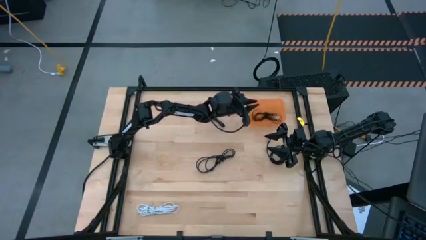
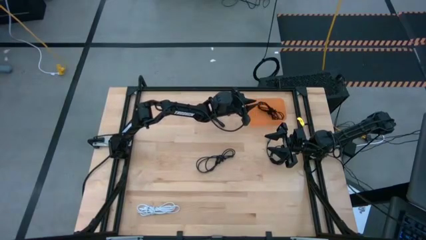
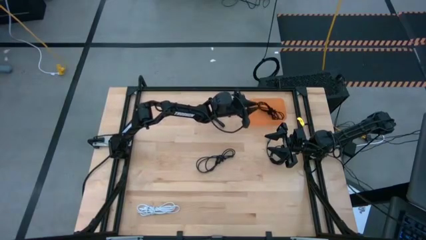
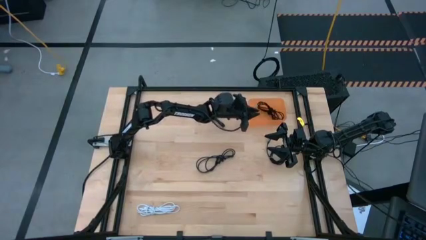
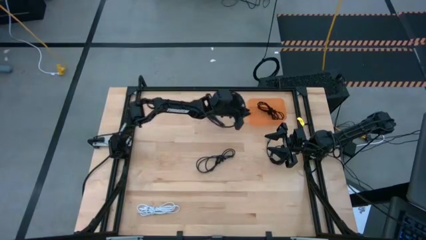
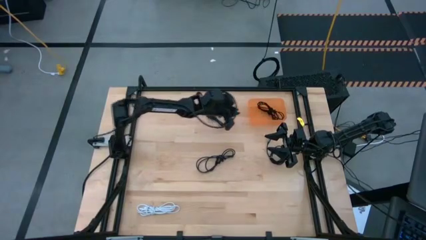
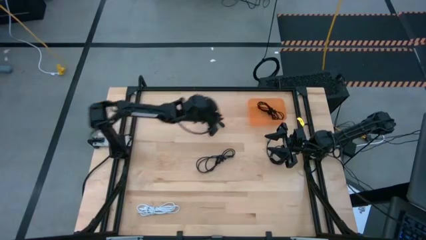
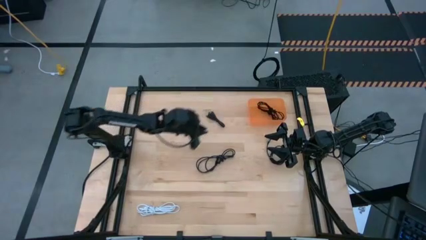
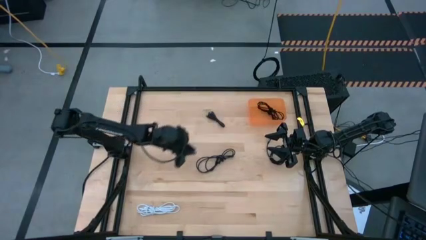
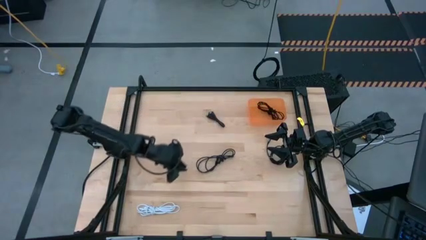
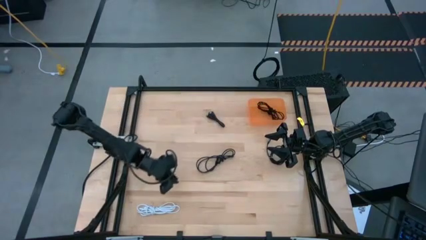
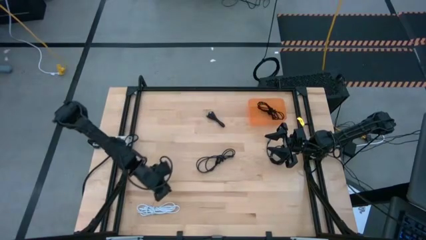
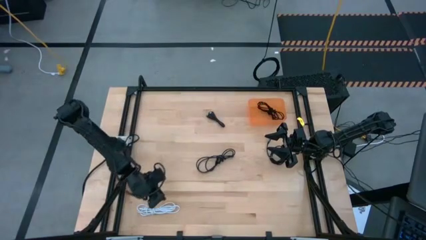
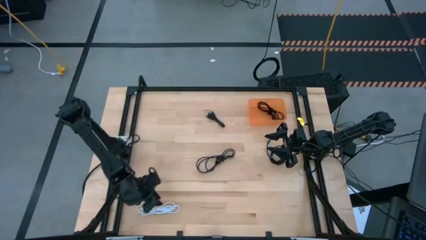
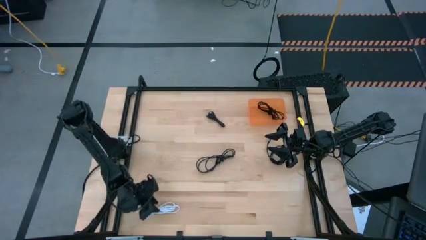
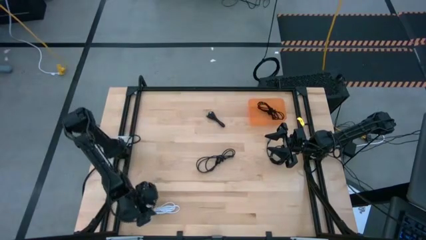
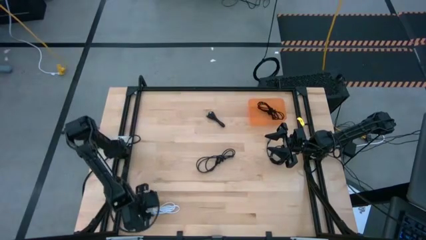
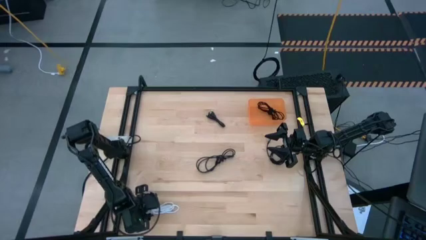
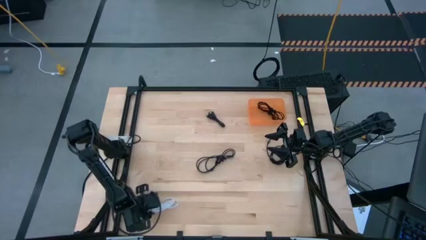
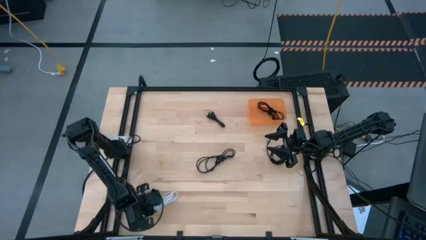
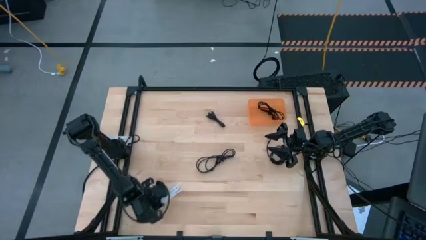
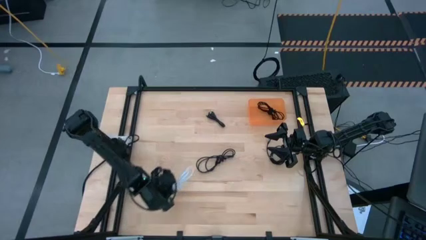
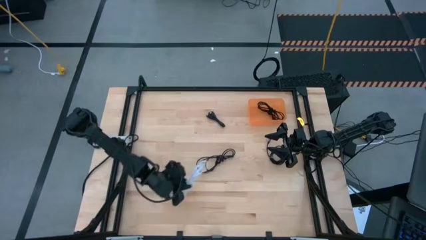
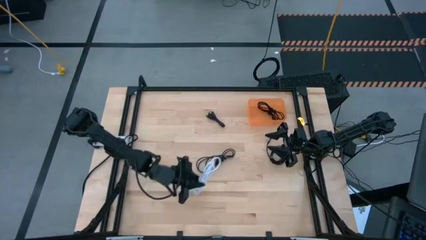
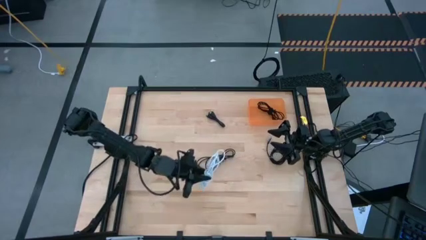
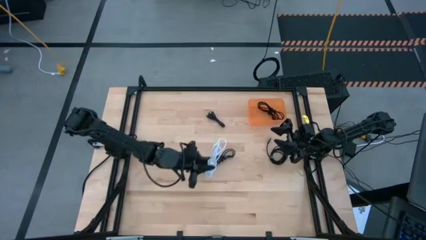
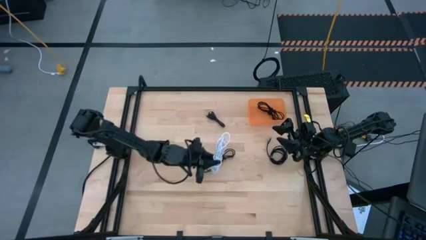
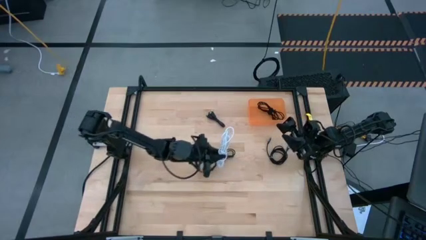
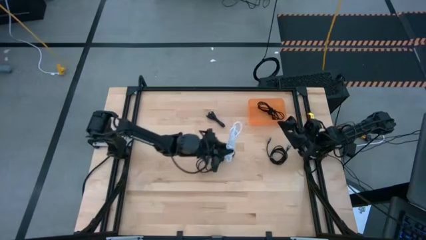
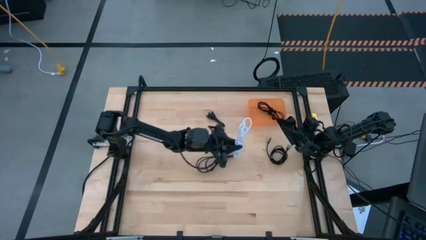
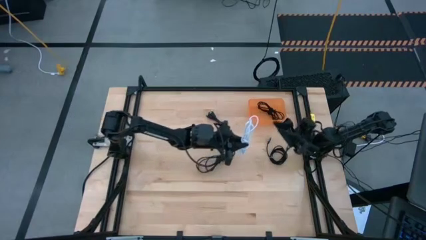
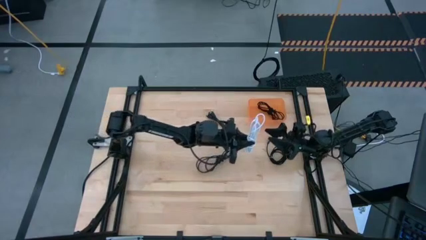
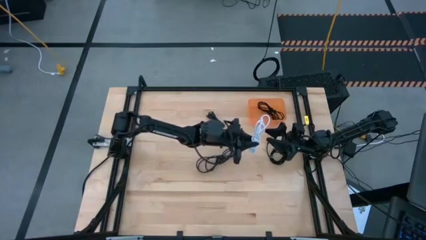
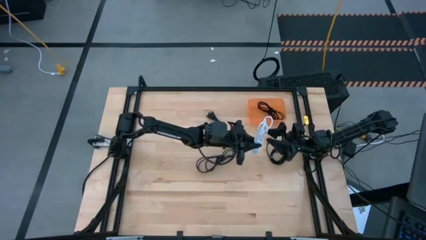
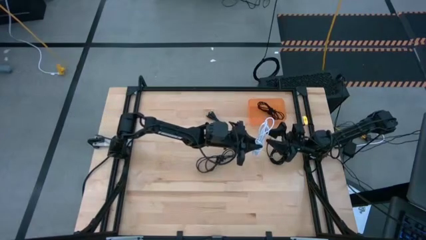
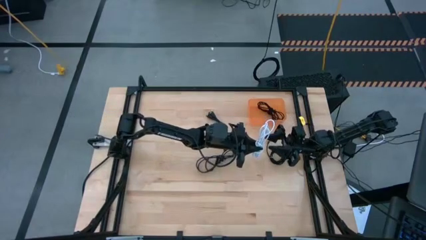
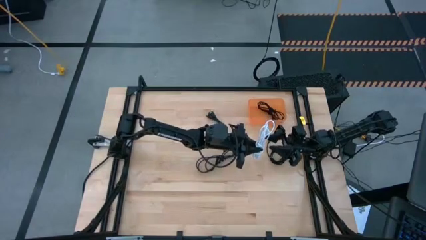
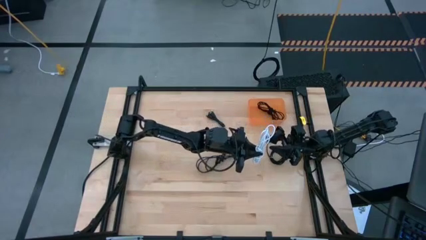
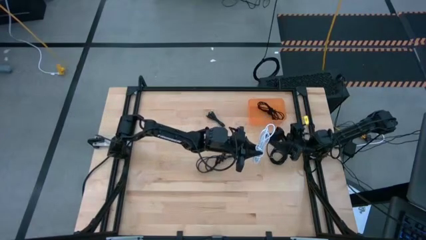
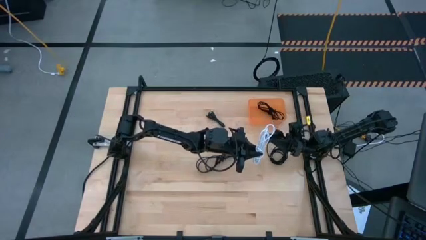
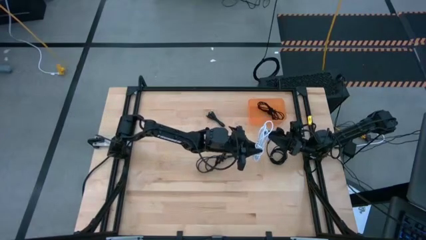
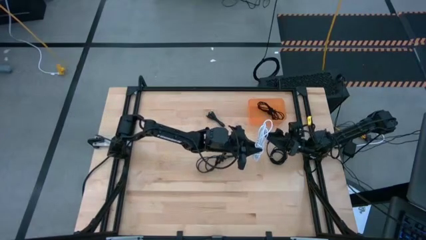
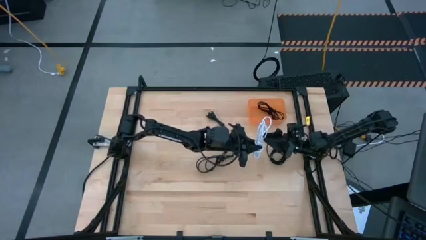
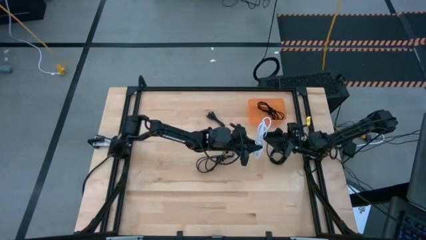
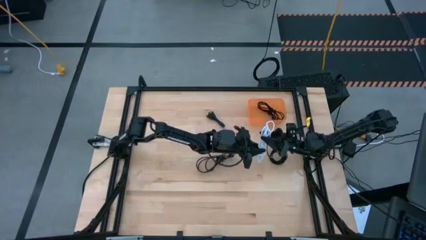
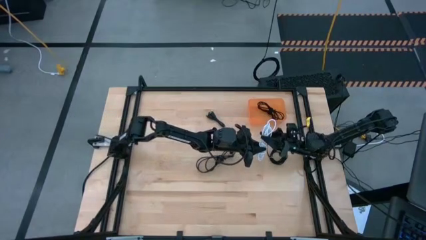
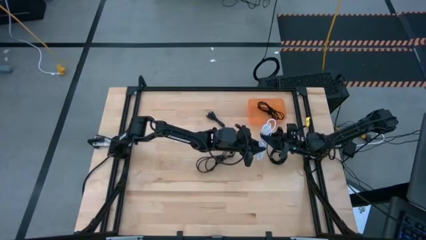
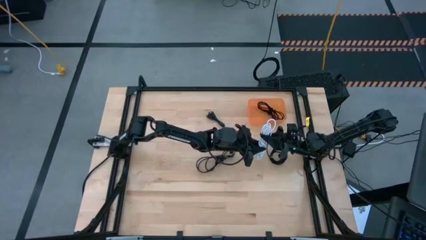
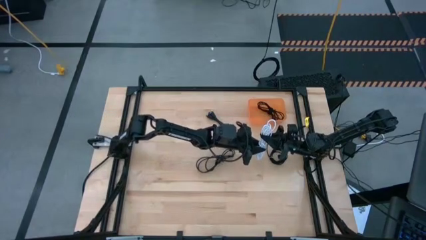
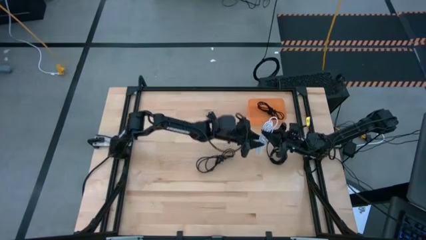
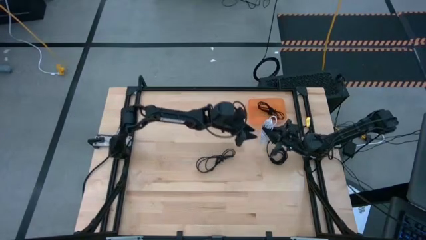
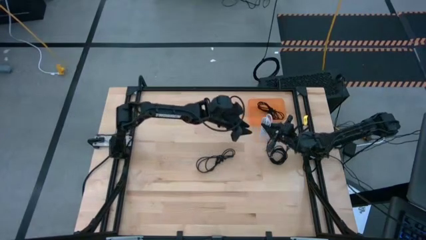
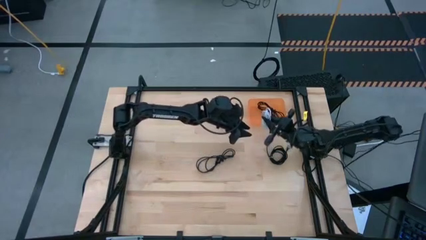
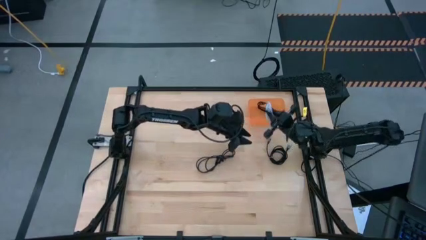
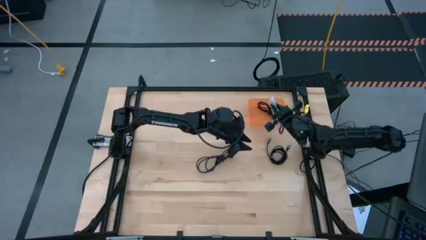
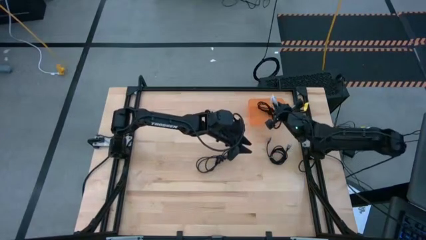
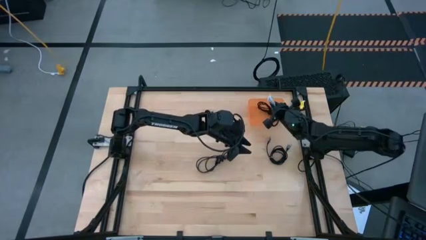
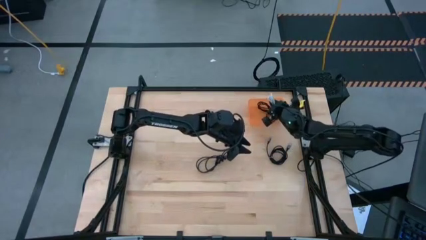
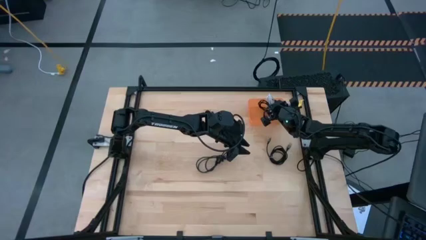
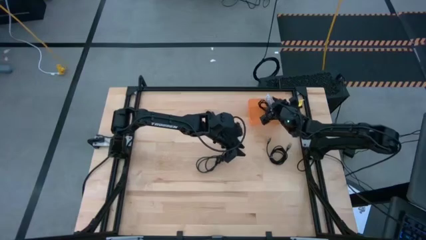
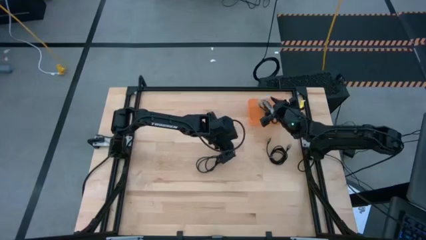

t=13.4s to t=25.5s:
Task: Pick and place USB-C Cables
Put the white charger cable into the orange bin
